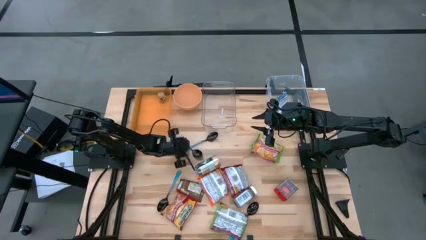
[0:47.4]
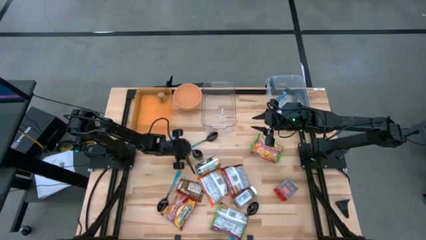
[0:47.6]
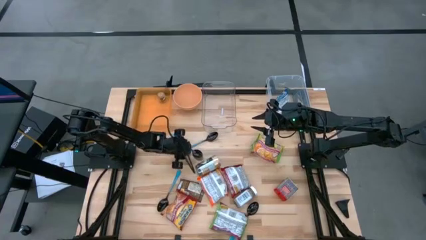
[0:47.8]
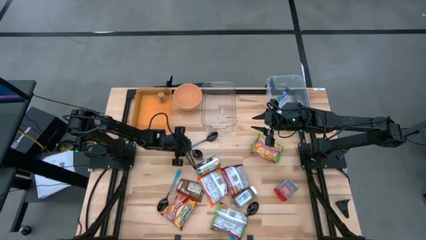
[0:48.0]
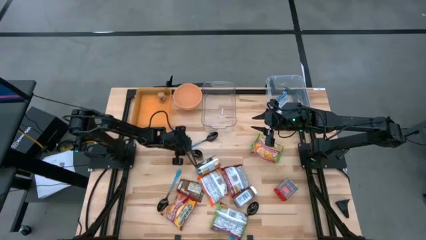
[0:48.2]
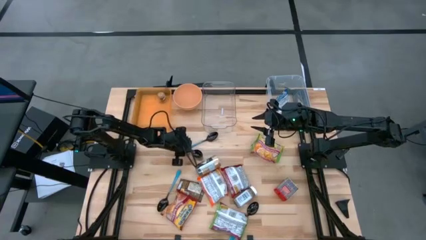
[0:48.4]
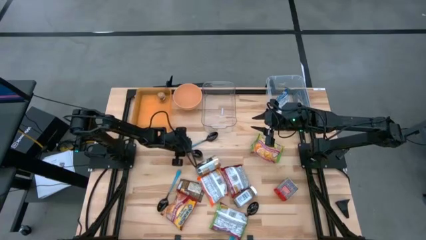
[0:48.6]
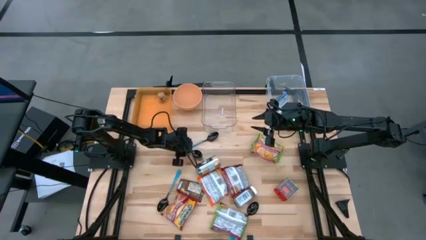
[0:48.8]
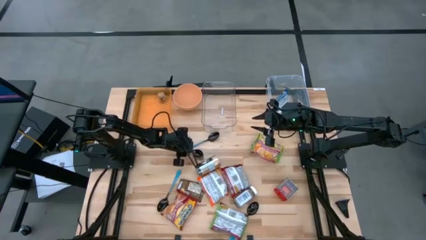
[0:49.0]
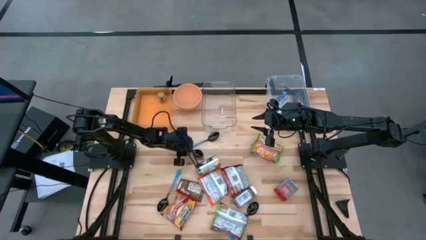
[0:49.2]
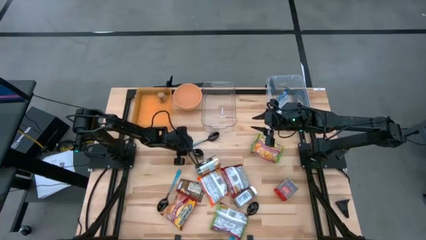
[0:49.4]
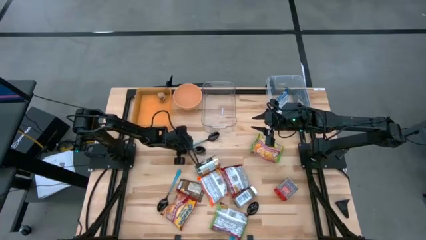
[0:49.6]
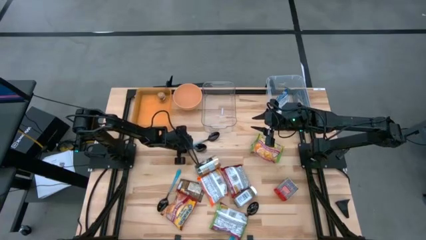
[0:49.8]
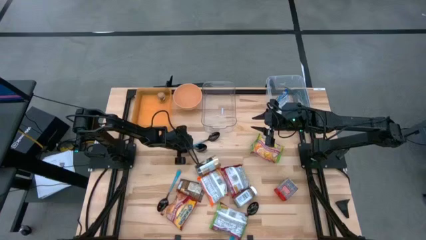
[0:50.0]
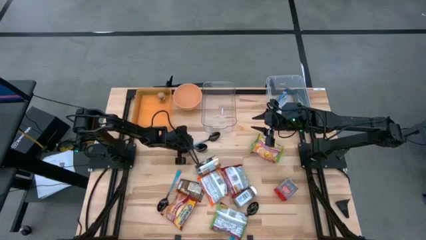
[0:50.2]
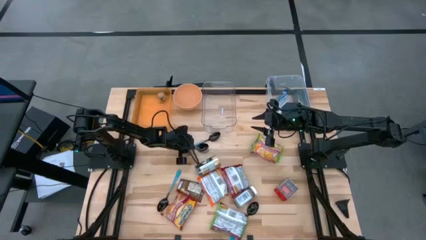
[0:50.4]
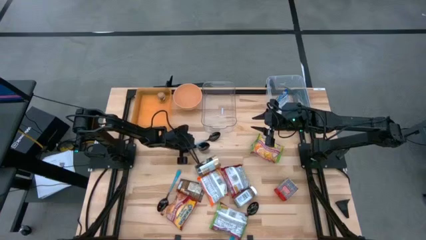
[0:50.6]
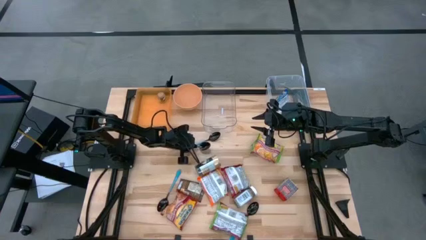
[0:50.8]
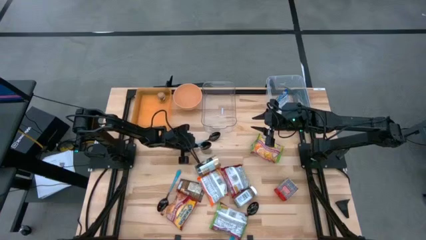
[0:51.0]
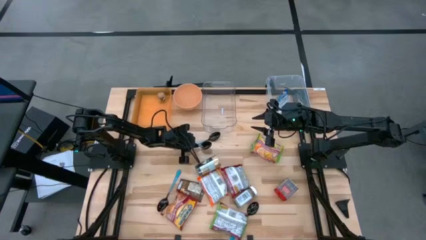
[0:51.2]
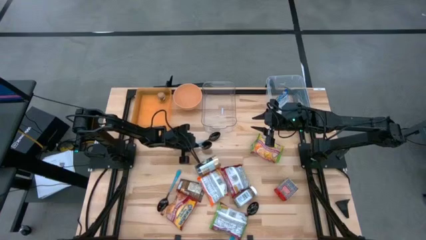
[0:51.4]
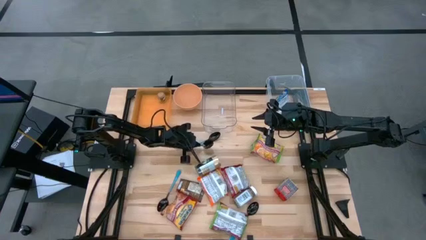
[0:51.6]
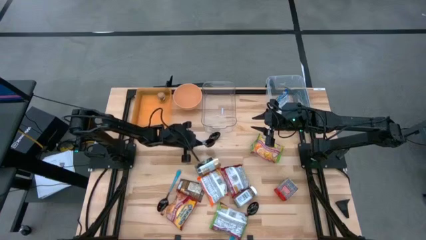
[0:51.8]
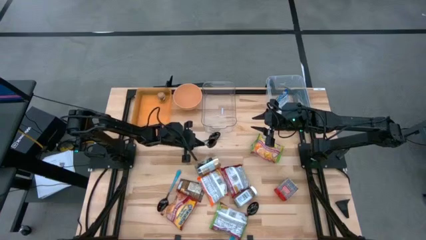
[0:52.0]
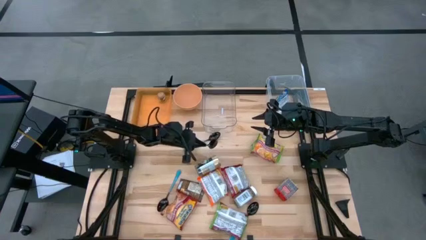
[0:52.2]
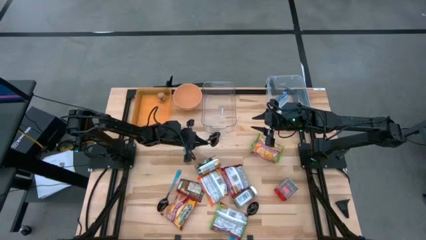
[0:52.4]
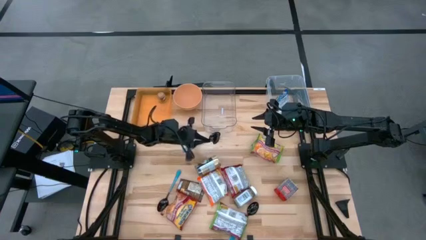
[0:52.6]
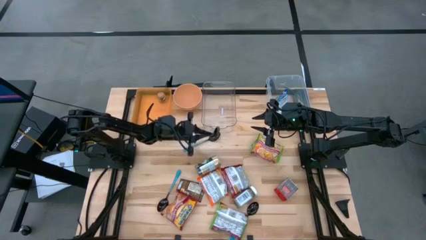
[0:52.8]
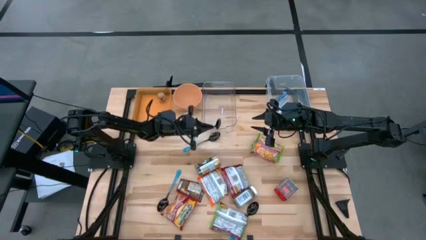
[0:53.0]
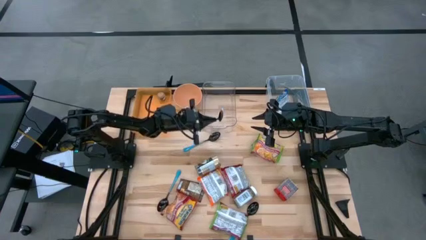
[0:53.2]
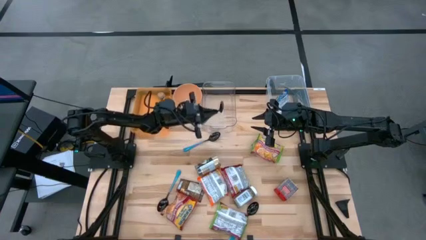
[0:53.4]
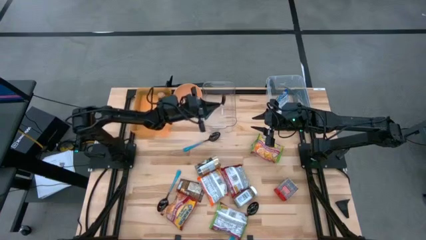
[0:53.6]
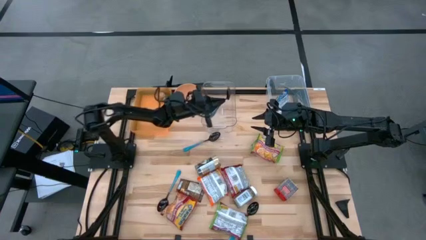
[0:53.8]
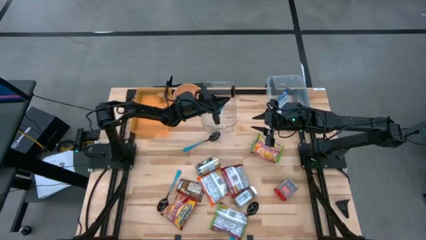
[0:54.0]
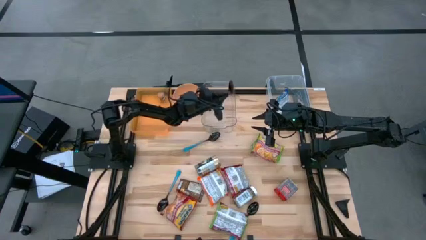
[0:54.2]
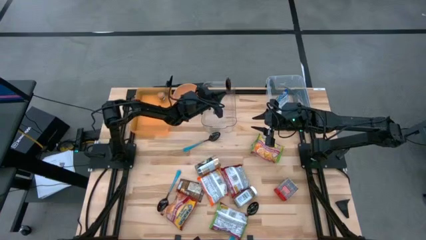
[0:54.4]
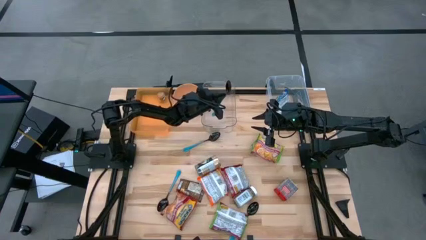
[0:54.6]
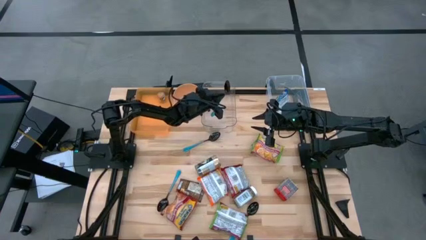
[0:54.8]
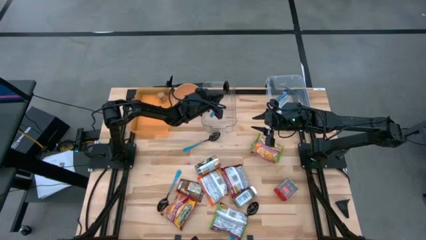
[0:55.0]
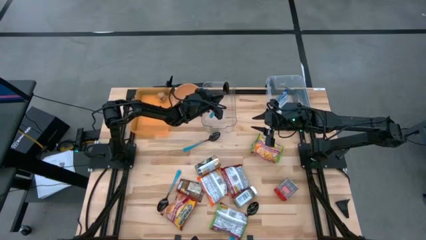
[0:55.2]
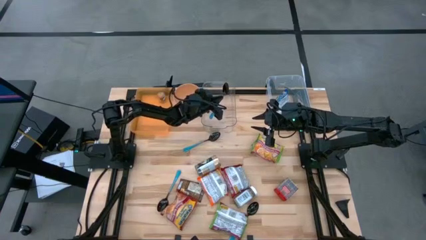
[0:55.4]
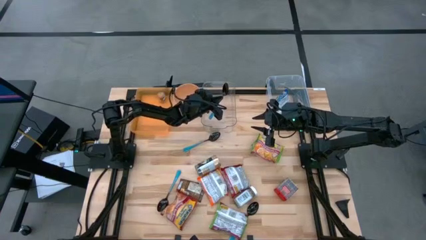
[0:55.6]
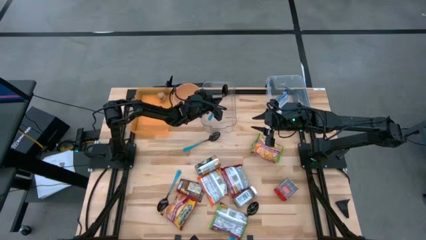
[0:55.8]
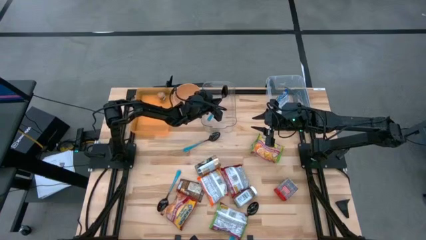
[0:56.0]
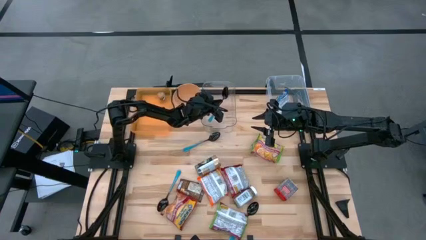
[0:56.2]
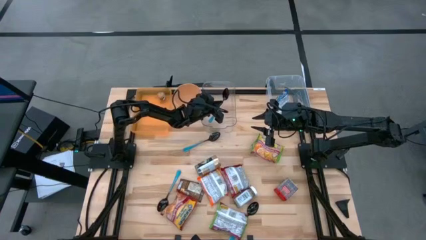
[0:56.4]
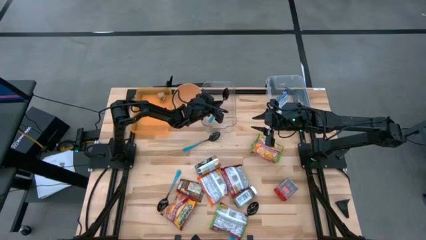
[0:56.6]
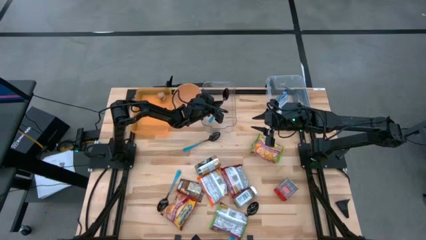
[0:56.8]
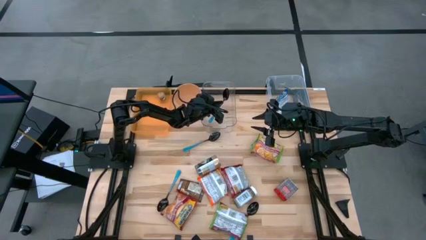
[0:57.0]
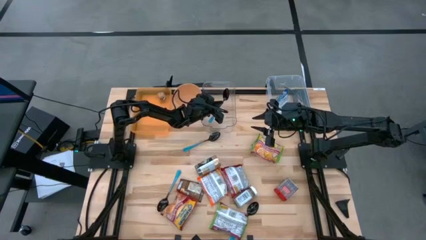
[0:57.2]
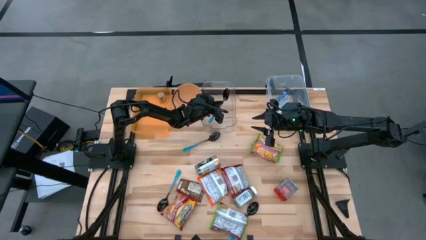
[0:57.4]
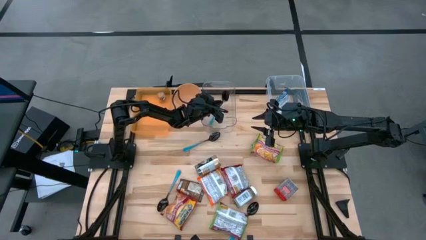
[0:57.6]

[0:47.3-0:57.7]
Task: Pick & Place Food Item
Put the blue spoon into the transparent bin
